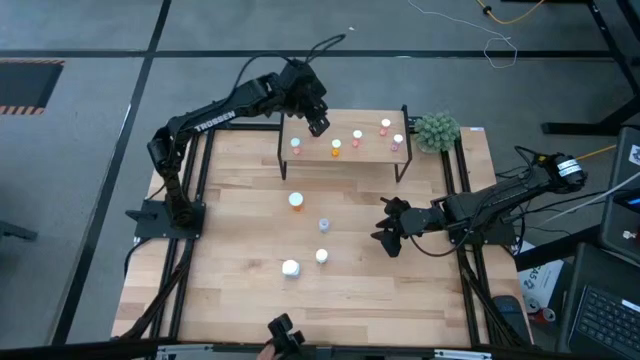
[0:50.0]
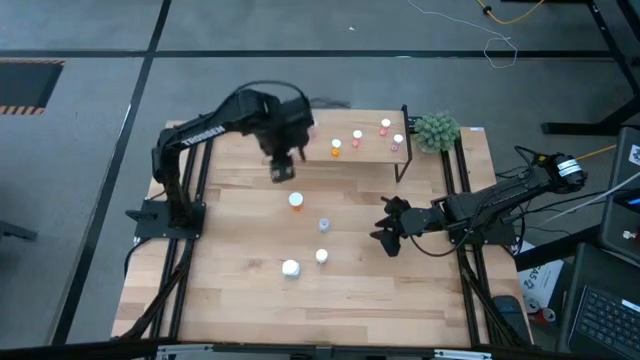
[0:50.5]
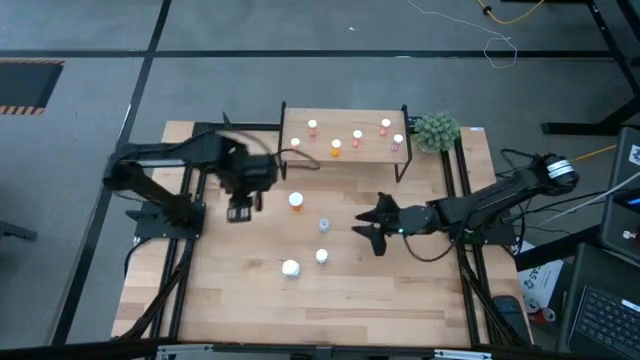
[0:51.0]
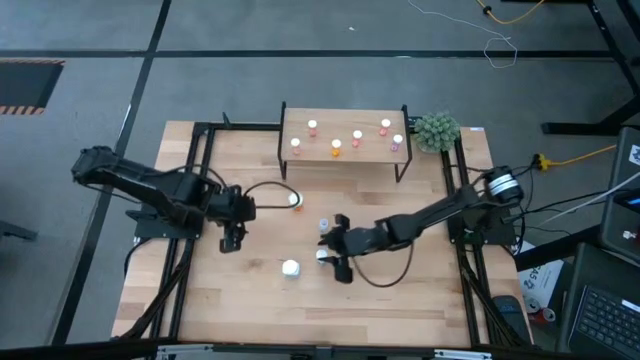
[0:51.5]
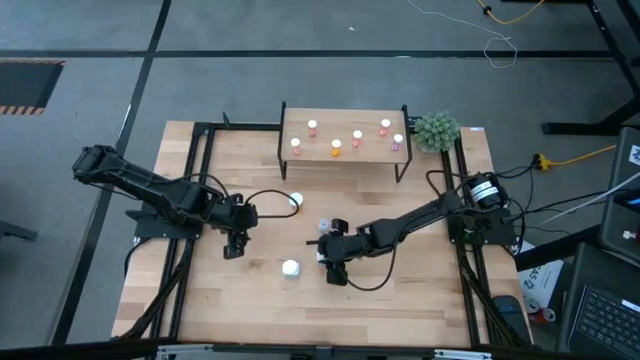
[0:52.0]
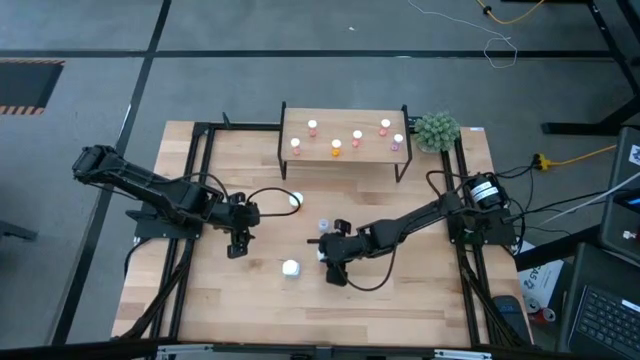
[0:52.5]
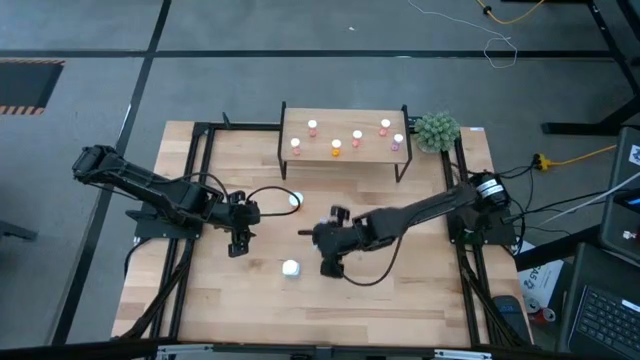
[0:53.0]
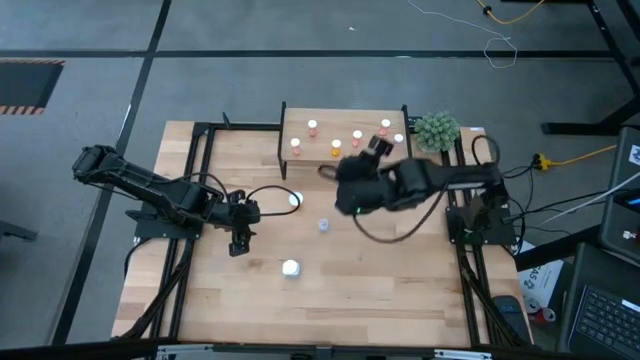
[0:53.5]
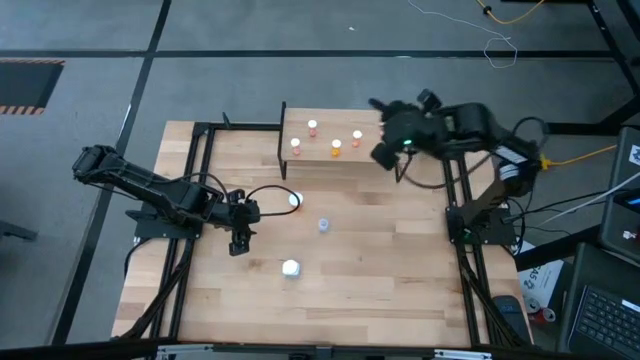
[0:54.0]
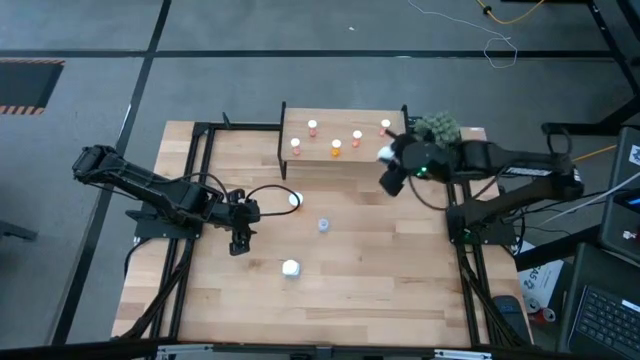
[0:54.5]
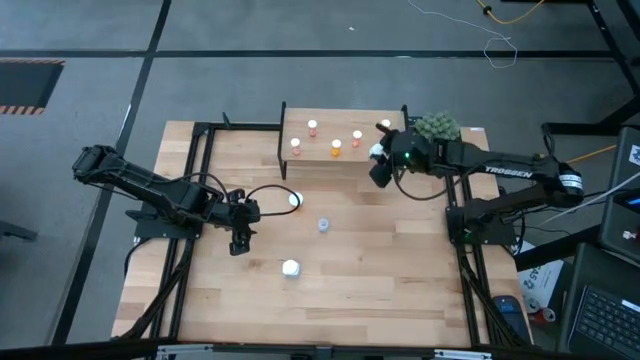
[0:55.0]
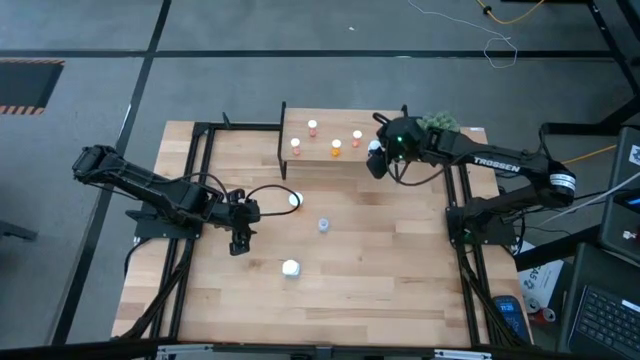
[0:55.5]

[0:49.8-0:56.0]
Task: Pick and place medicine bottles onto shelf by color
Put the big white pill bottle on the shelf

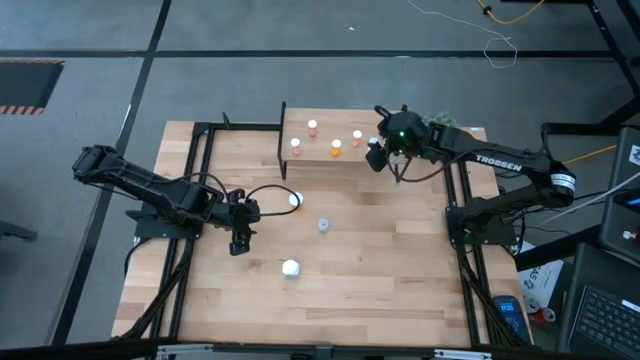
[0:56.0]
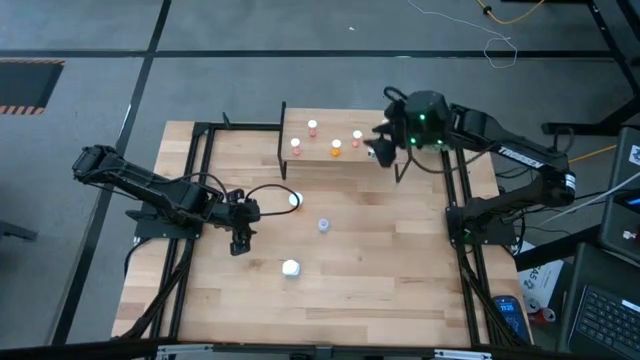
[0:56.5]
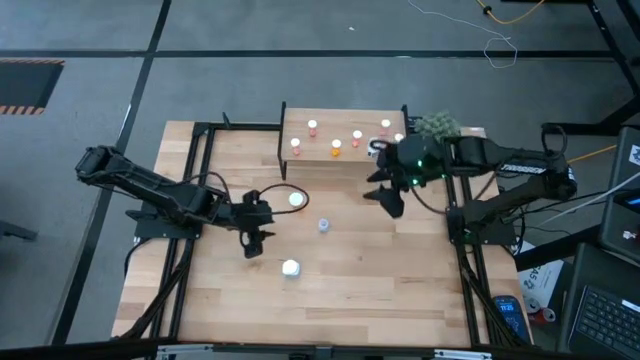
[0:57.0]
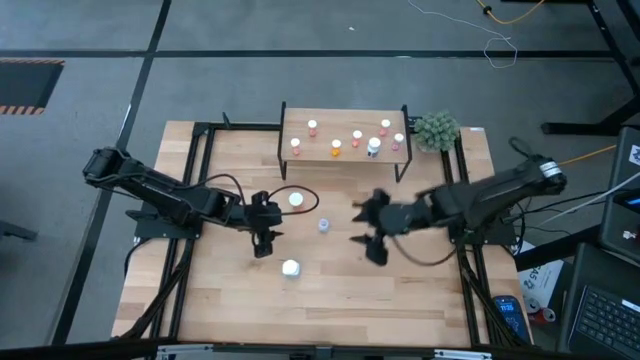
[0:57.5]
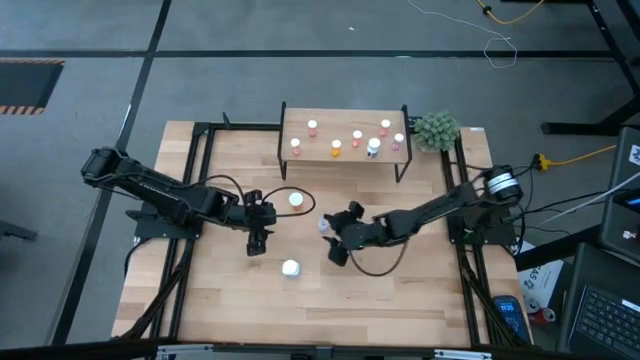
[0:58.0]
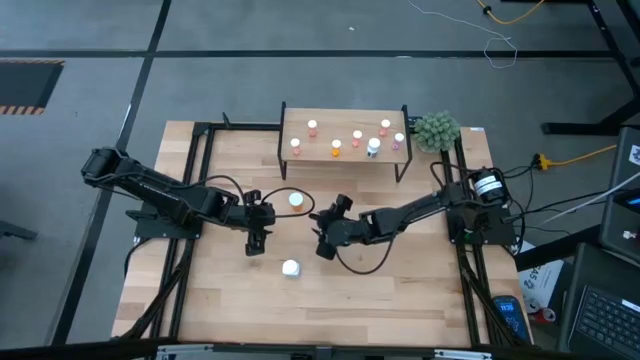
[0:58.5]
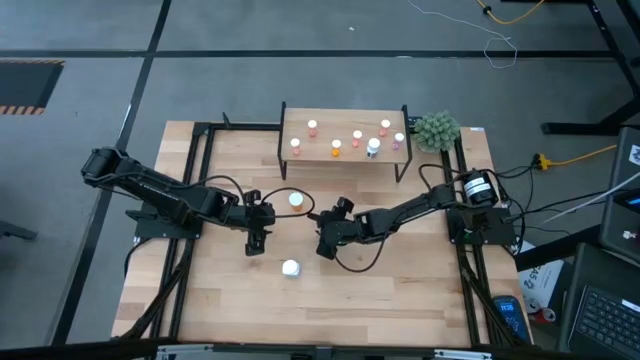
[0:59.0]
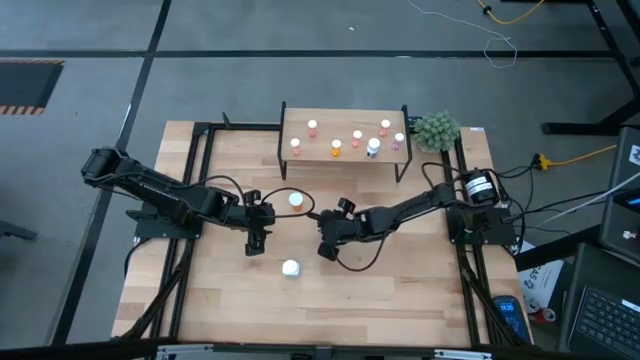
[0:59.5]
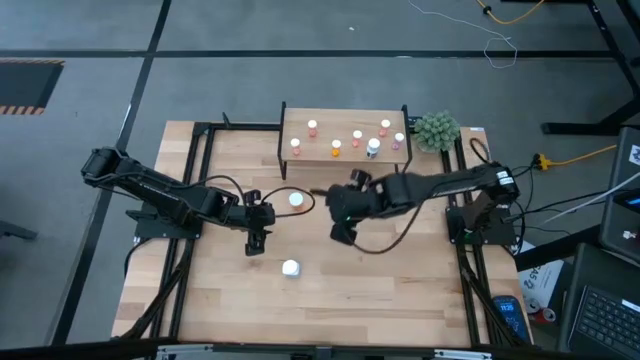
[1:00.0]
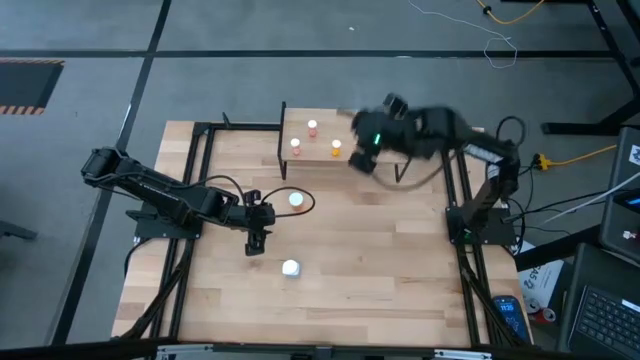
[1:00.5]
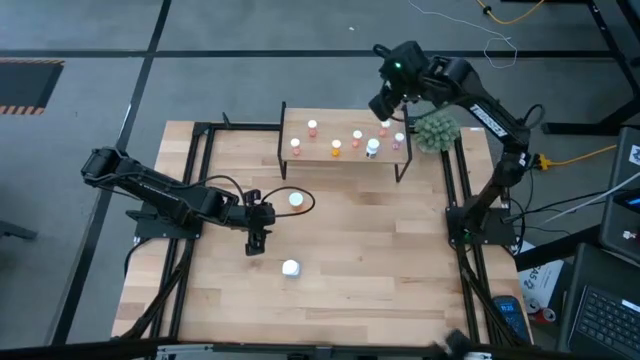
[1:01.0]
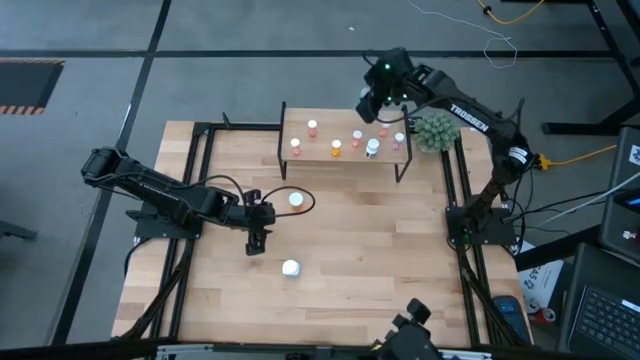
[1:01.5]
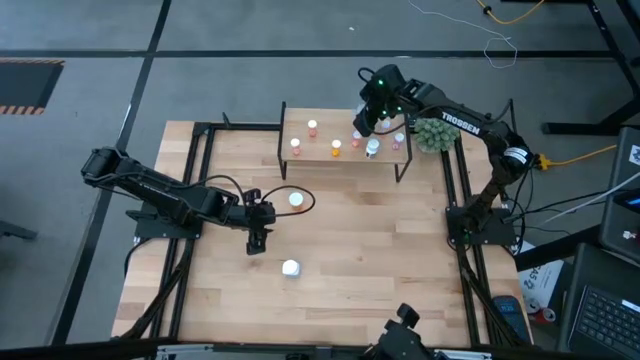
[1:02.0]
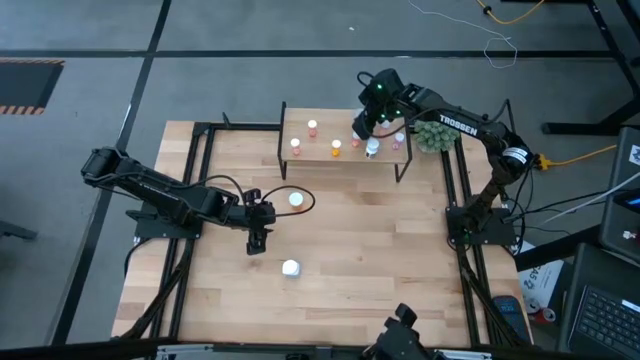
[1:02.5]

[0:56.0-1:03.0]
Put the small white pill bottle on the shelf

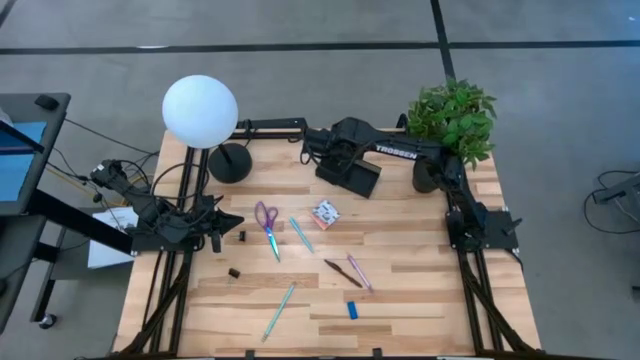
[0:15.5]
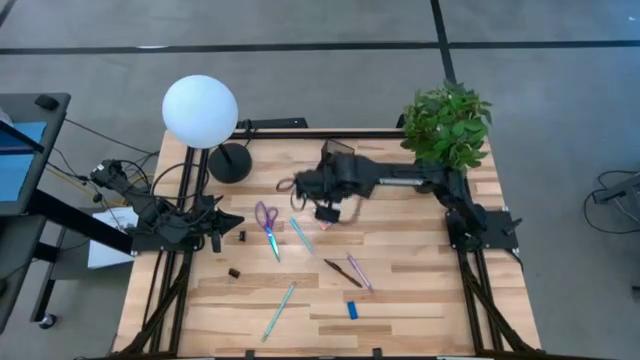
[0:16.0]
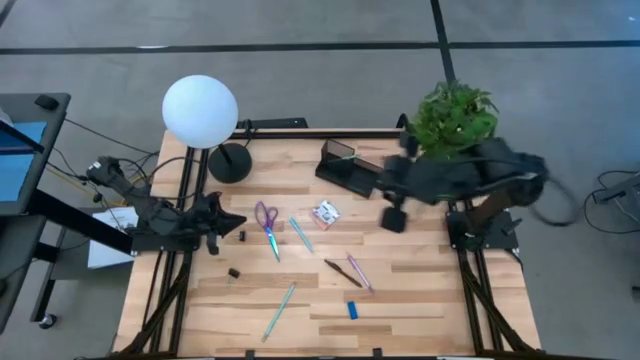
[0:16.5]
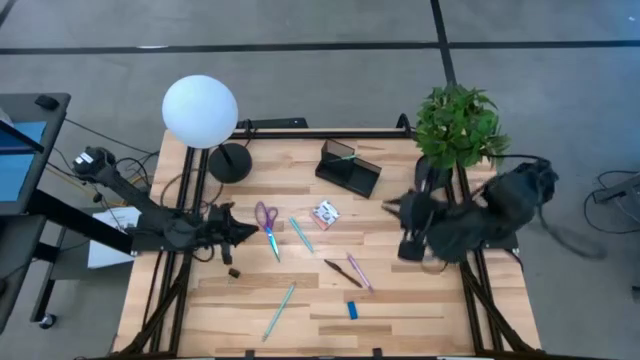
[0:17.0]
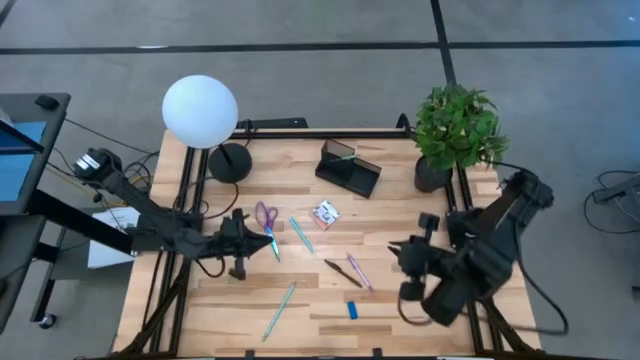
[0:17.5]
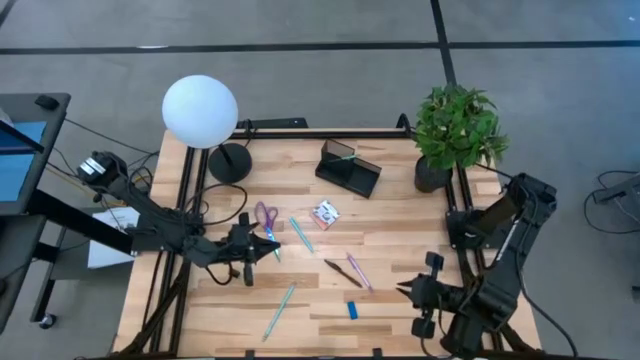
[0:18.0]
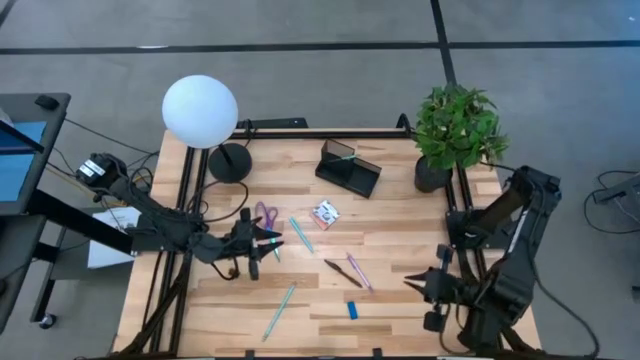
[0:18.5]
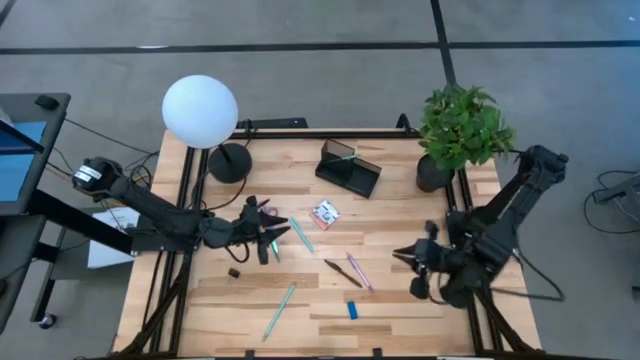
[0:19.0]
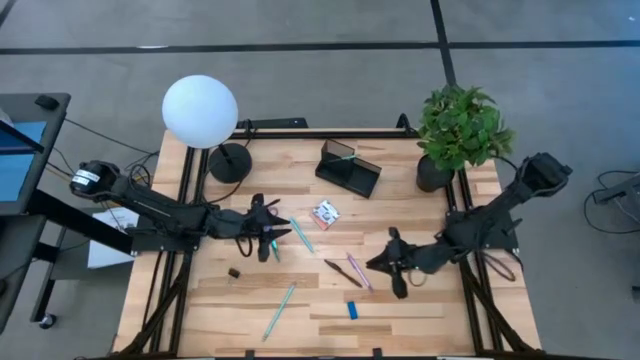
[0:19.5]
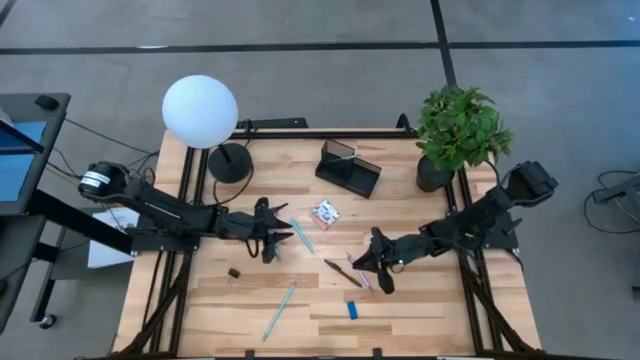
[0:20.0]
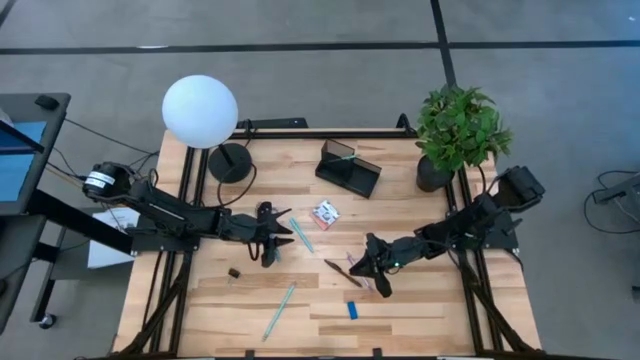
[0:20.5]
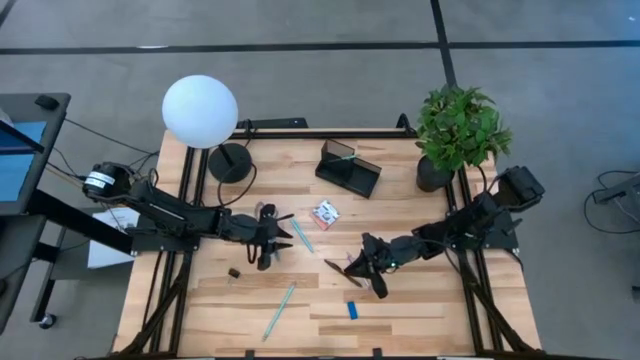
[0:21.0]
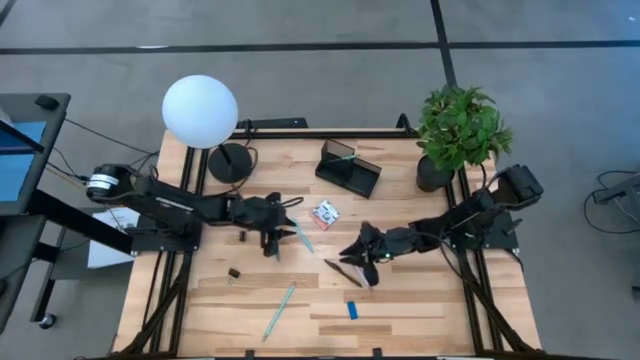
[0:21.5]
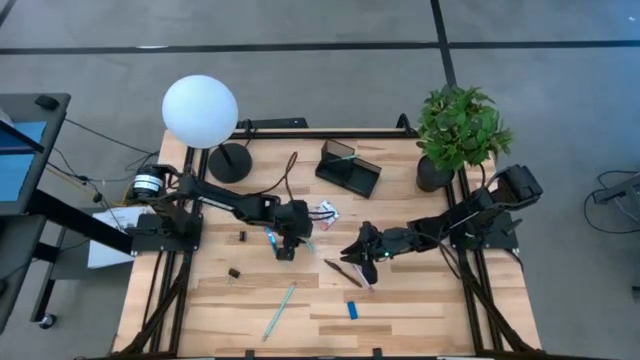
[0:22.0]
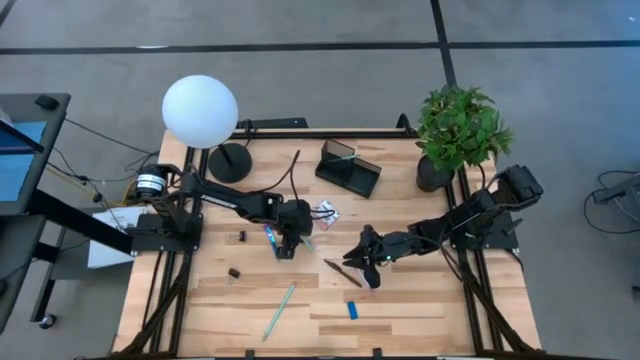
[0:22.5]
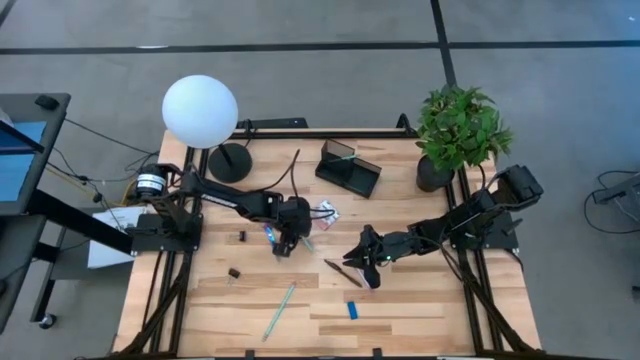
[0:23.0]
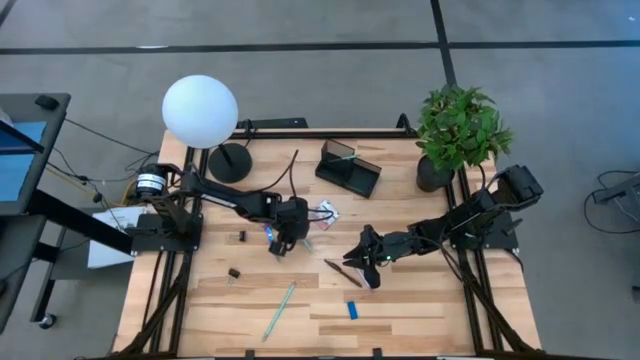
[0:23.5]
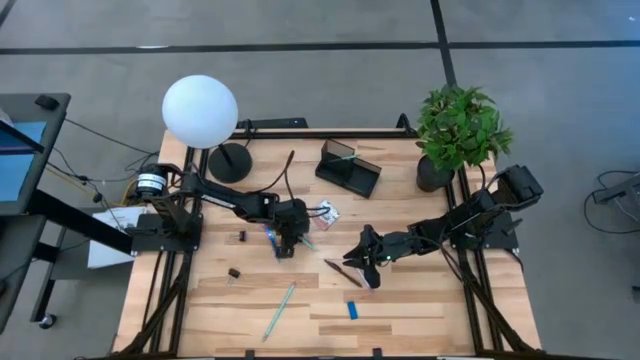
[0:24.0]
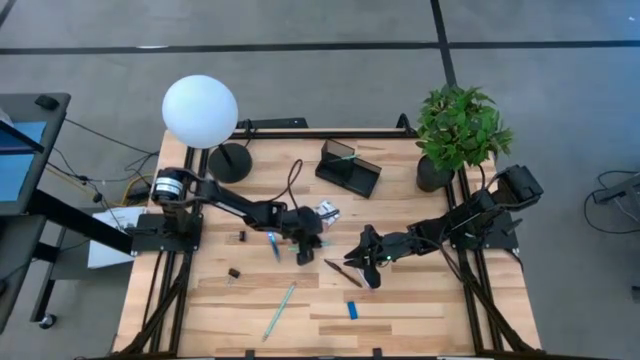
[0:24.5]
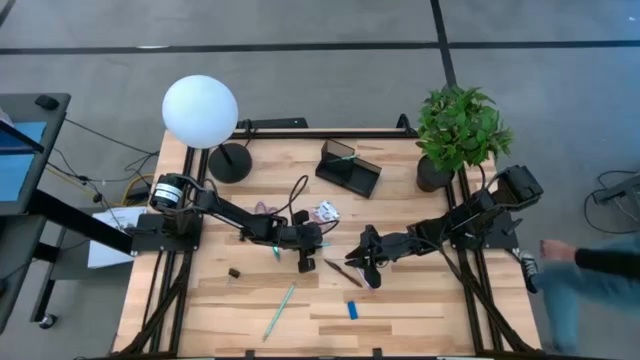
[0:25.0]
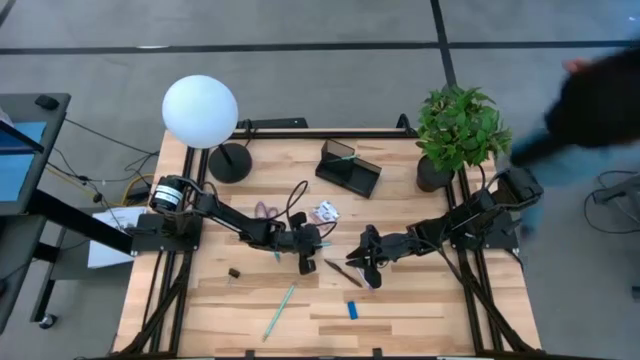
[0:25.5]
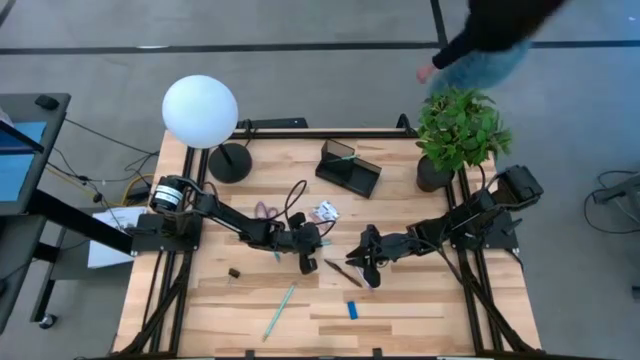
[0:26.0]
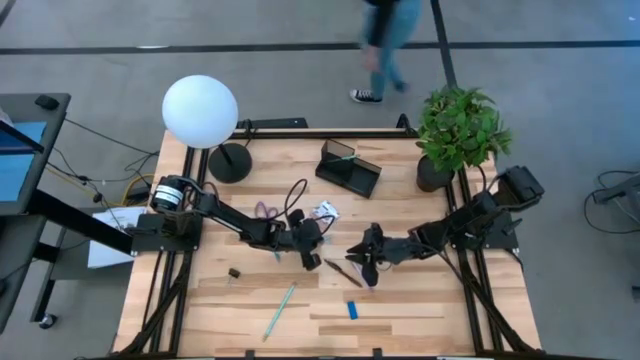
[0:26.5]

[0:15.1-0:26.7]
Task: Pick and place office supplies into organizer
Put the light blue pen into the black desk organizer
